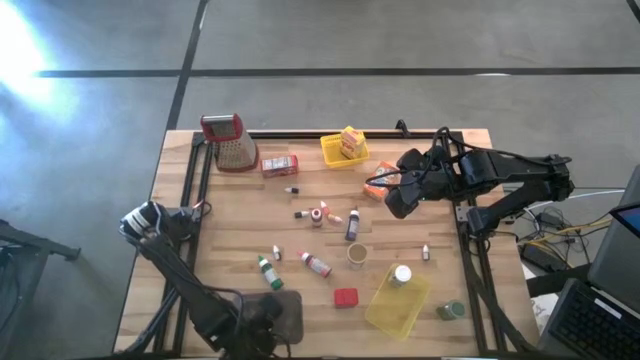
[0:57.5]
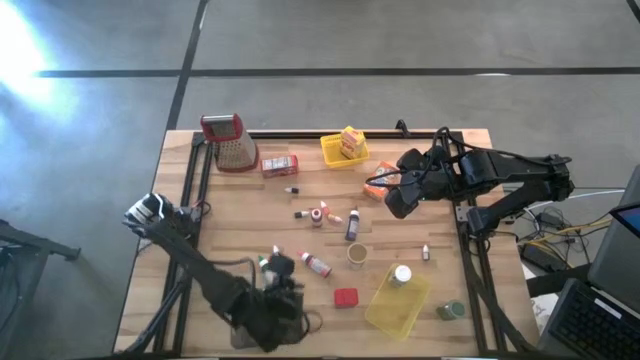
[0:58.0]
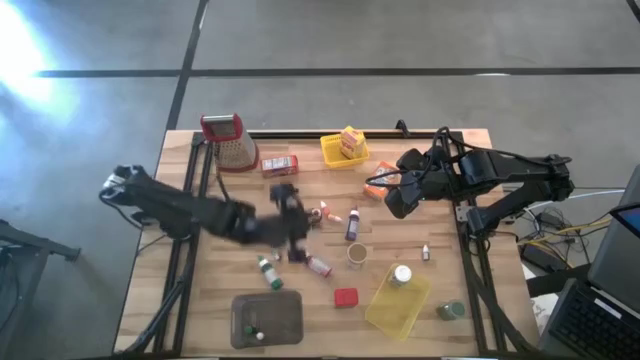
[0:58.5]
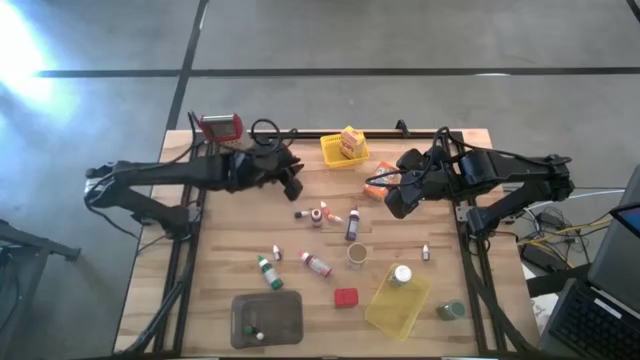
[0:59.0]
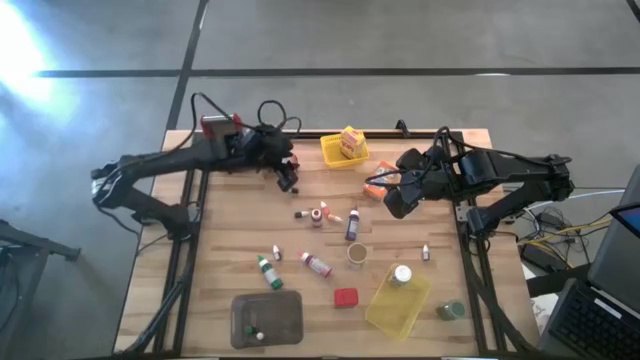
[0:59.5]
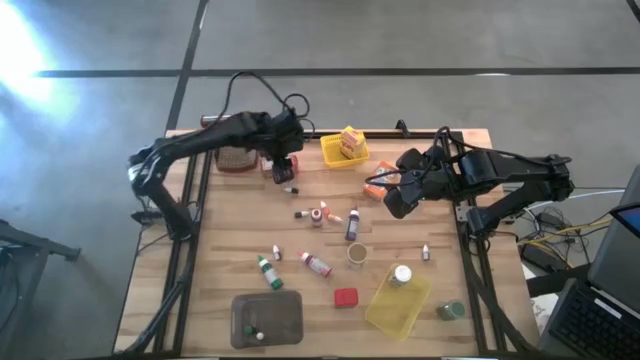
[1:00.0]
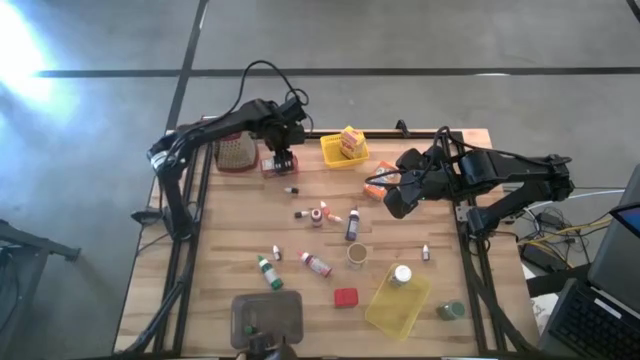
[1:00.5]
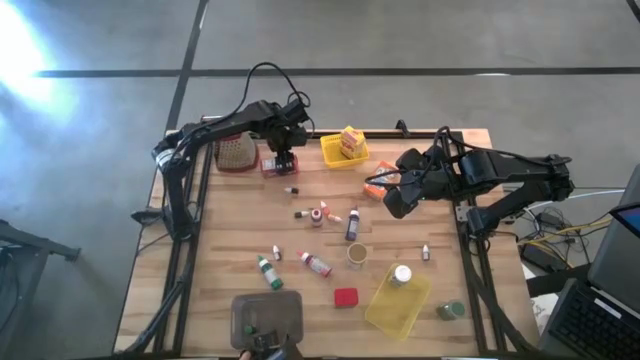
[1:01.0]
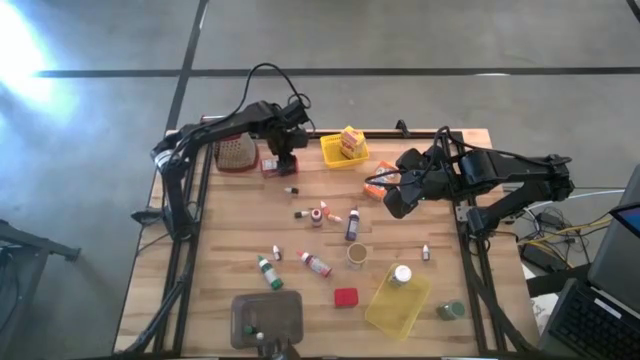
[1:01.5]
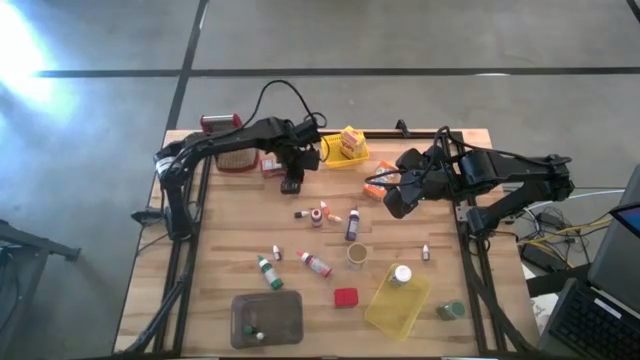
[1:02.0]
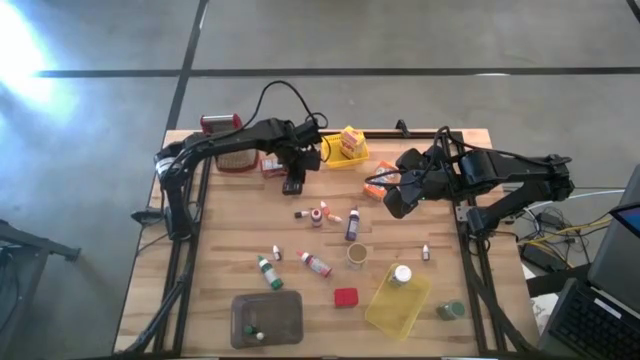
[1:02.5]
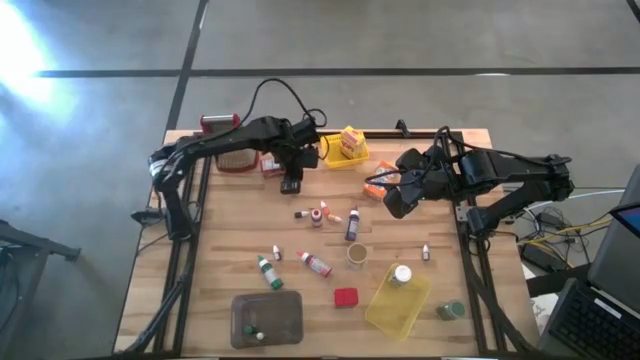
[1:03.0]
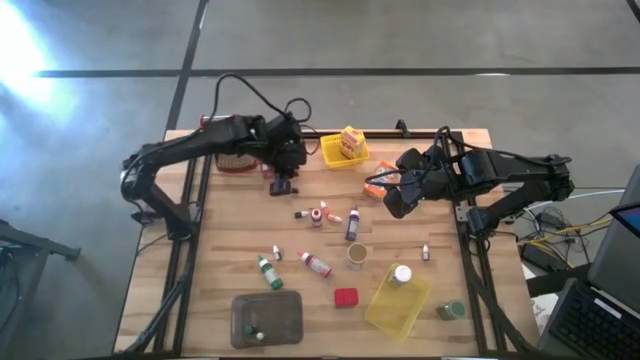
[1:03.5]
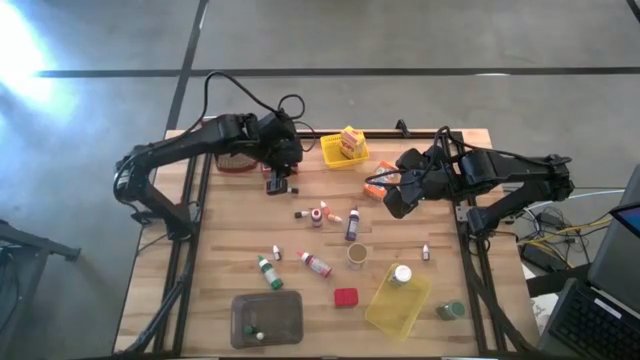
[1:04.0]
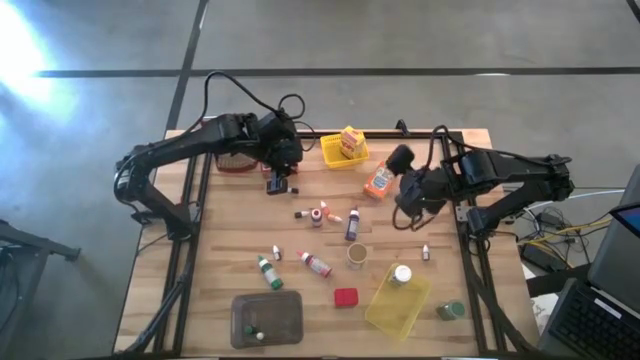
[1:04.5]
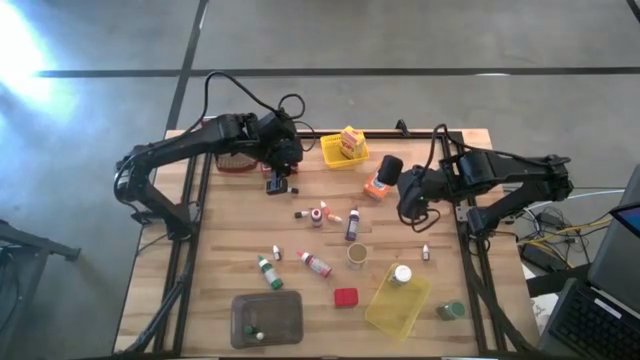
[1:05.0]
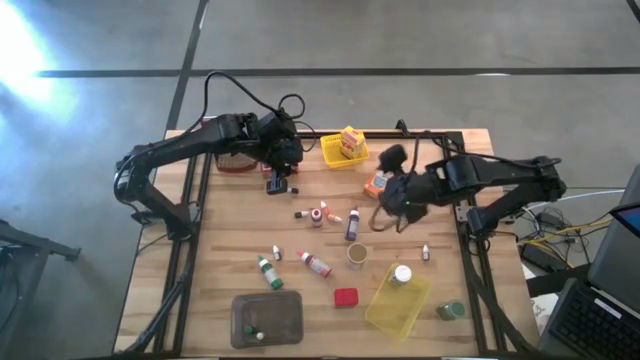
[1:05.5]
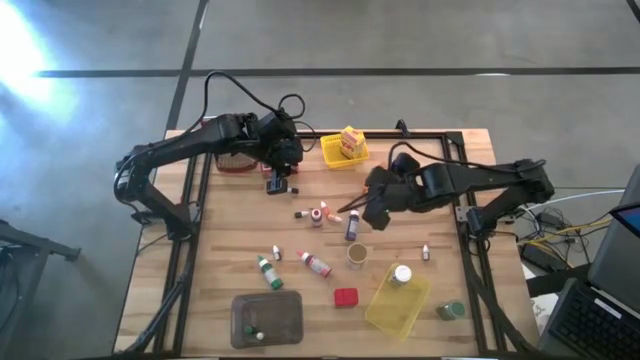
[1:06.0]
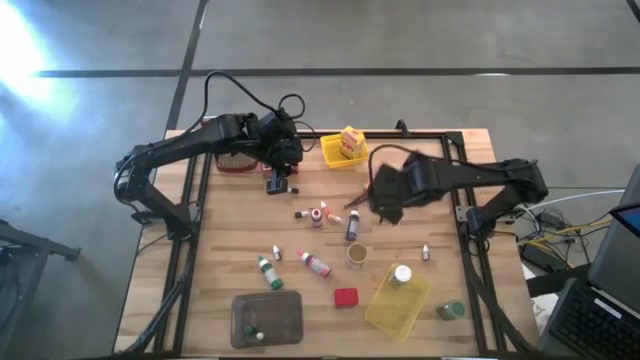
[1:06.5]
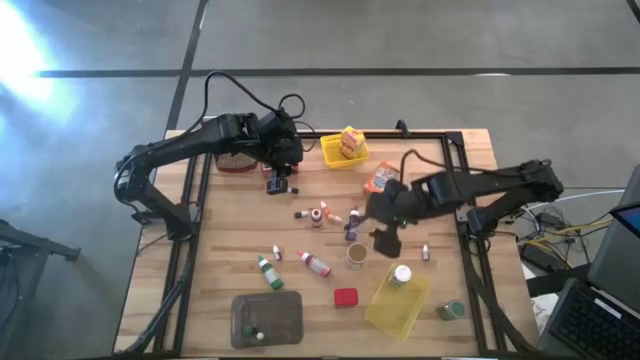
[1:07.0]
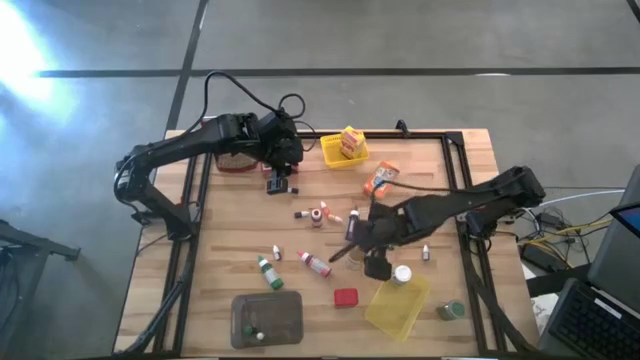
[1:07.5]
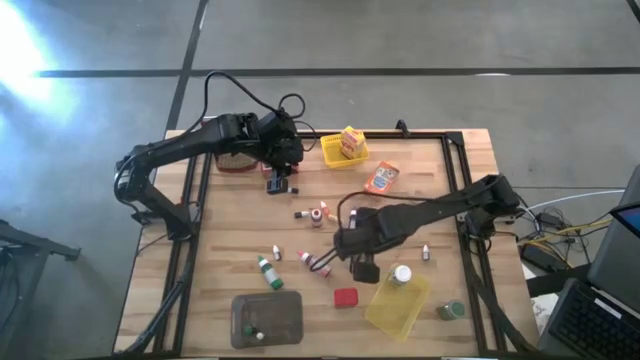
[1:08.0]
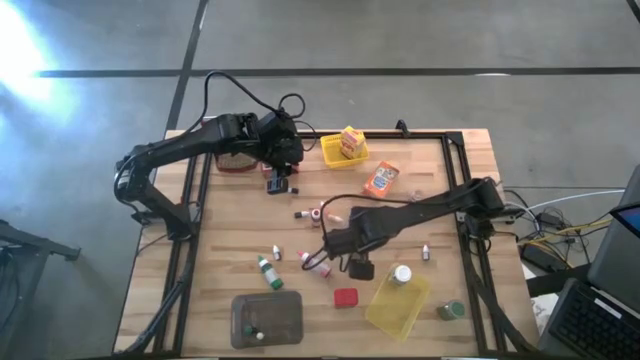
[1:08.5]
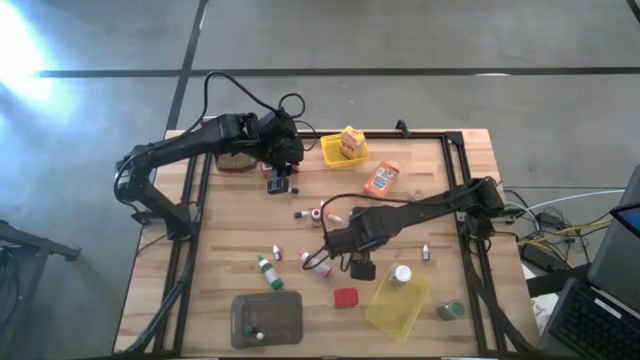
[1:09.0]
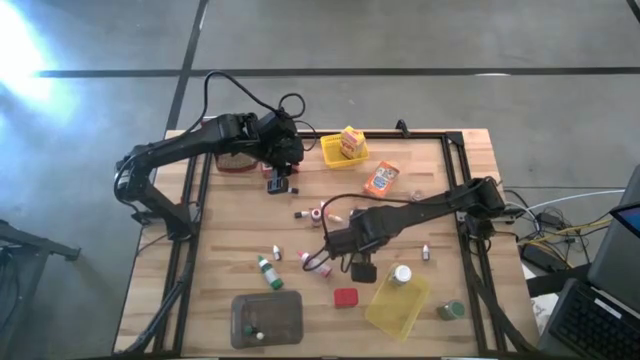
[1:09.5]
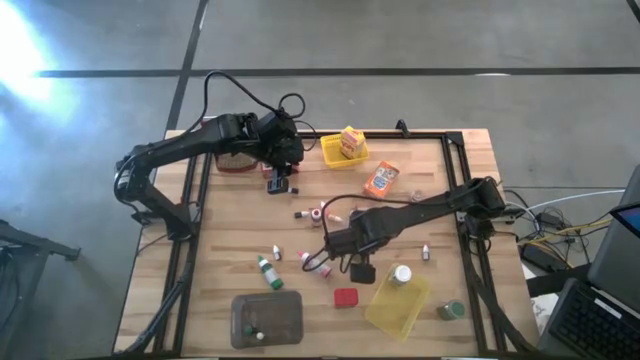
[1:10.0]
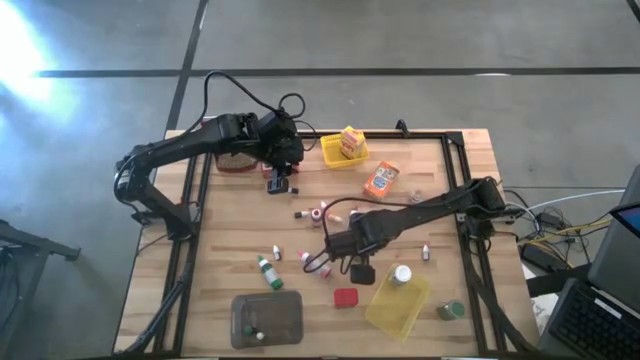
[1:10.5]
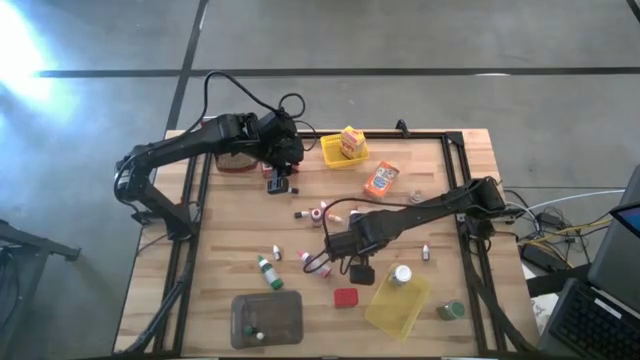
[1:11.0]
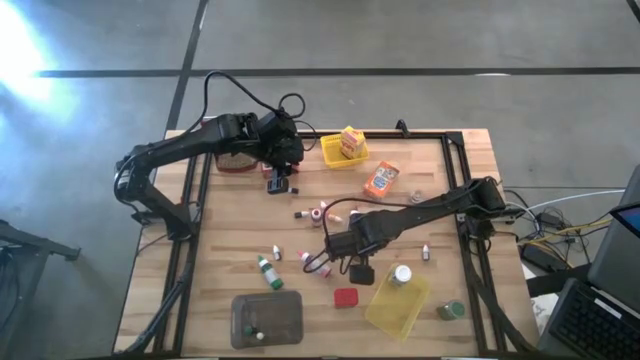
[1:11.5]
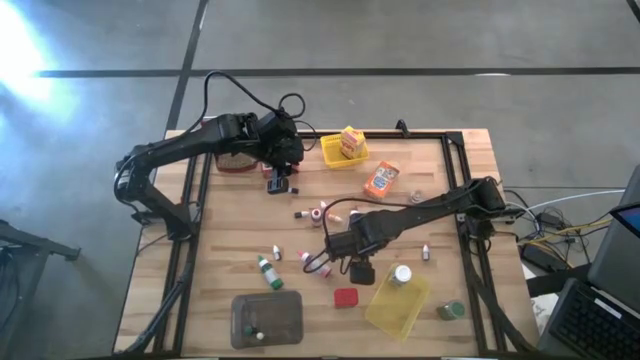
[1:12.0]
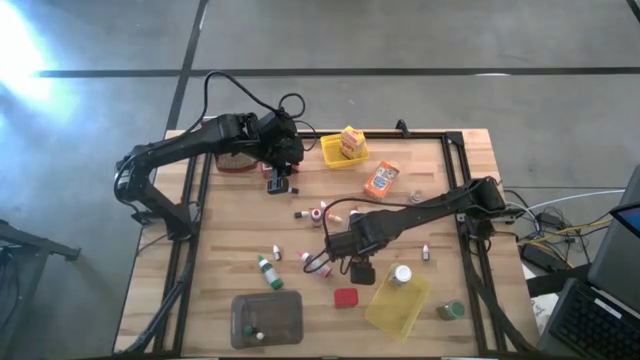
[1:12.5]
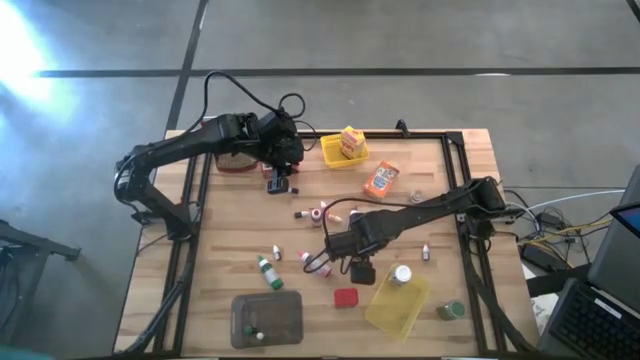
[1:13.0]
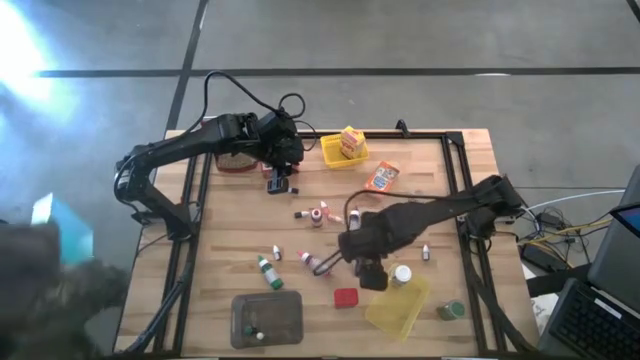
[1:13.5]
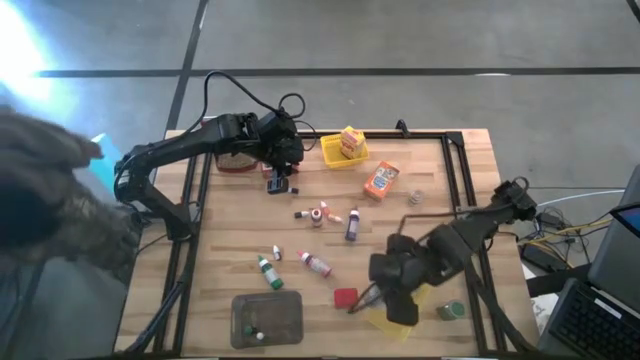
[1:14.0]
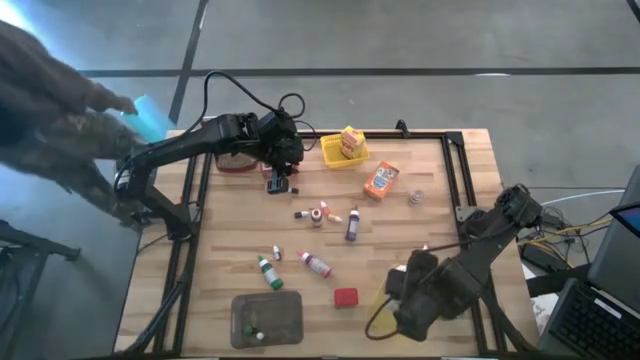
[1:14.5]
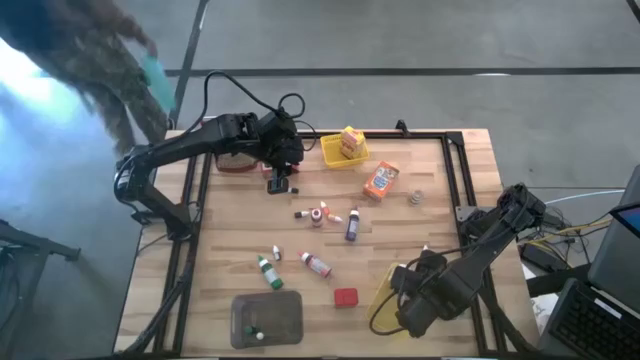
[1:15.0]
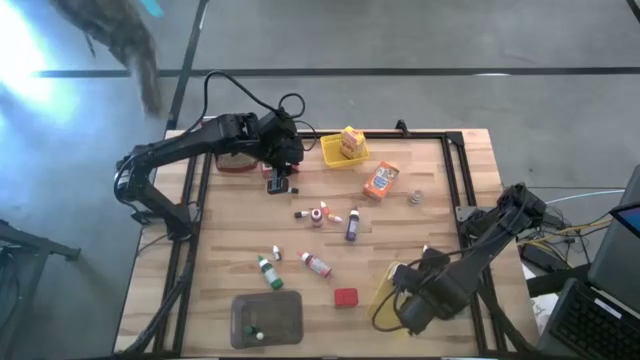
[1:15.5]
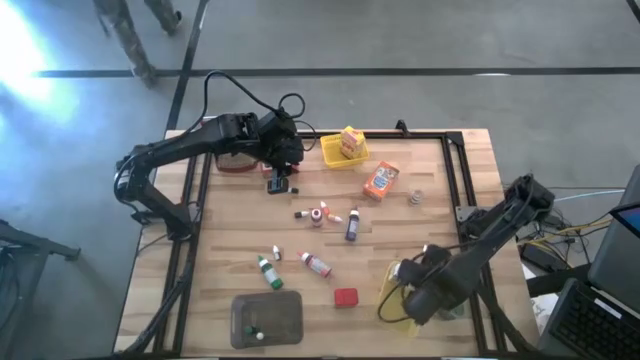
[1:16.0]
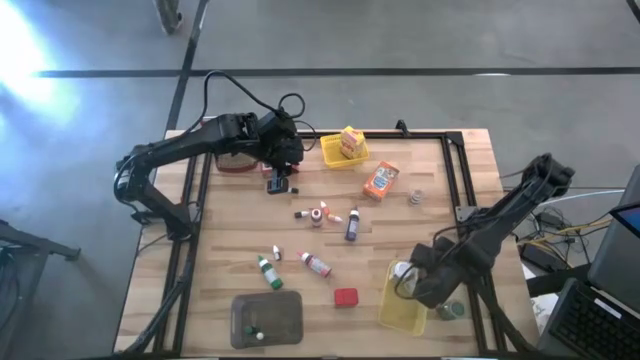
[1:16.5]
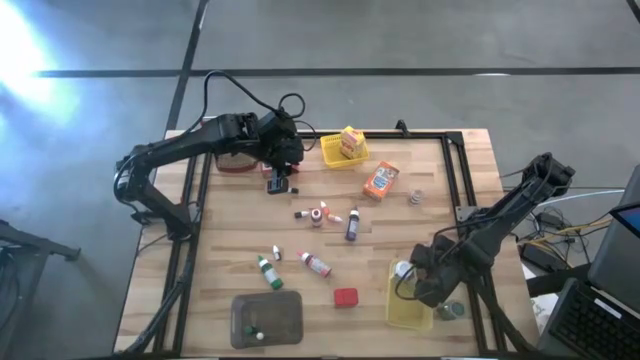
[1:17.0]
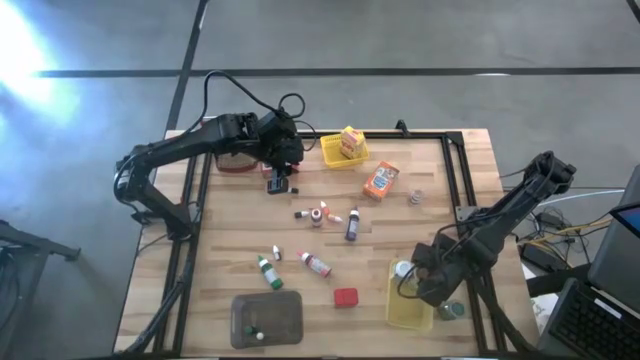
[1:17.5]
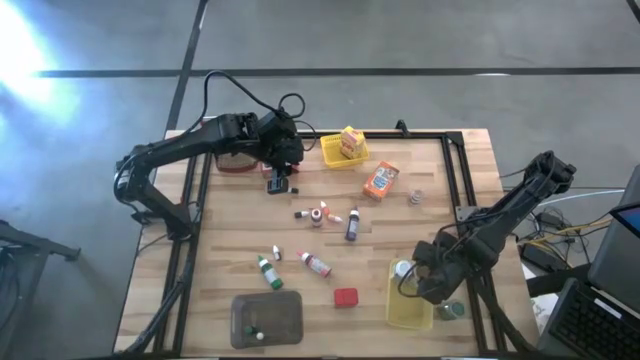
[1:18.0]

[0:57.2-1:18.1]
Task: Pick & Place Kitchen Items
Put the brown seasoning bottle into the bottom yellow bin
